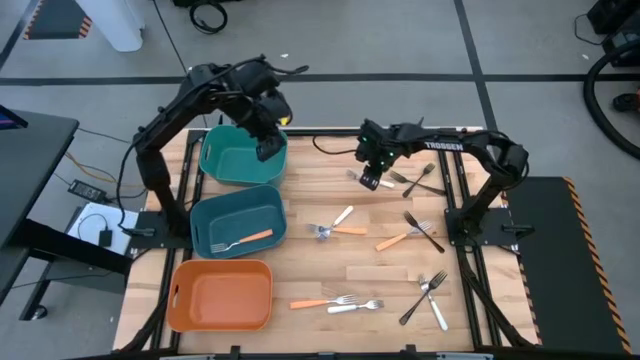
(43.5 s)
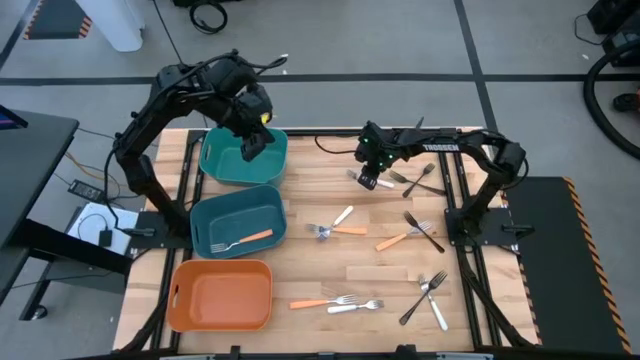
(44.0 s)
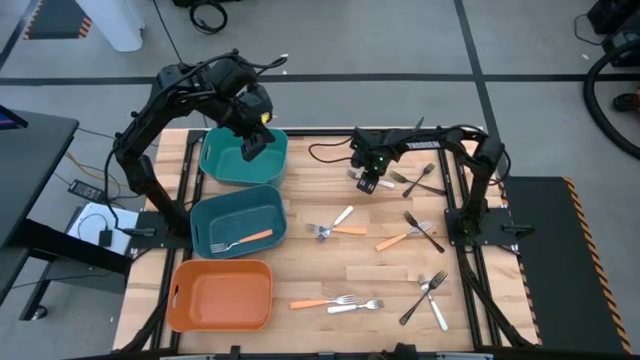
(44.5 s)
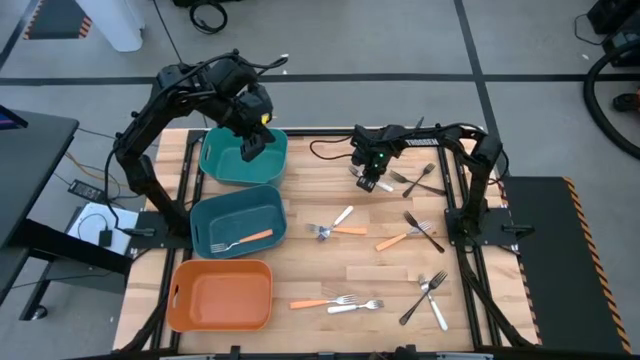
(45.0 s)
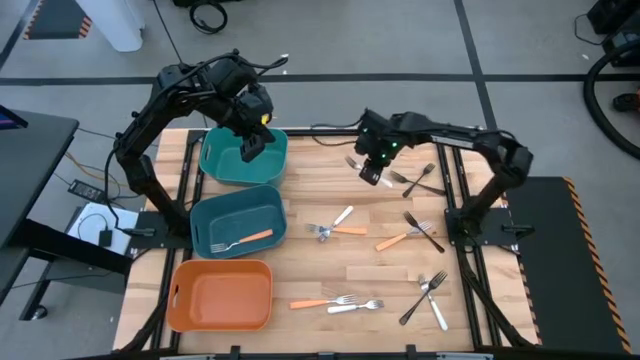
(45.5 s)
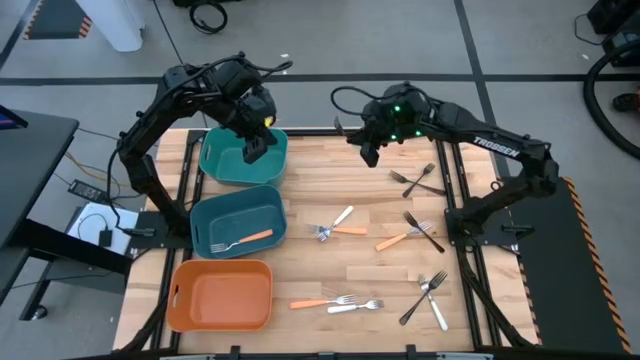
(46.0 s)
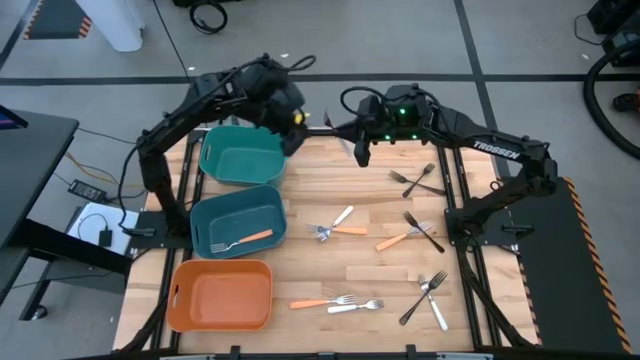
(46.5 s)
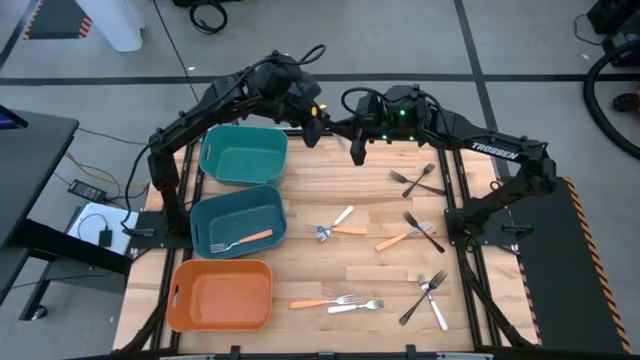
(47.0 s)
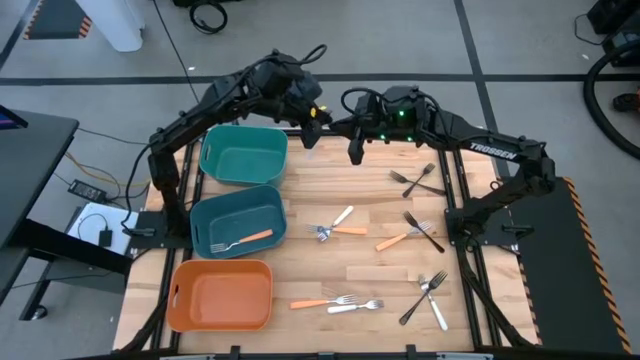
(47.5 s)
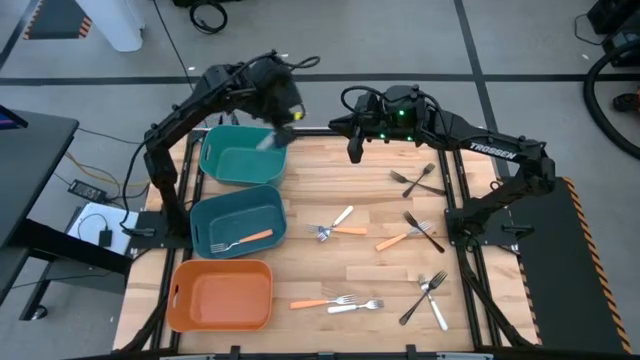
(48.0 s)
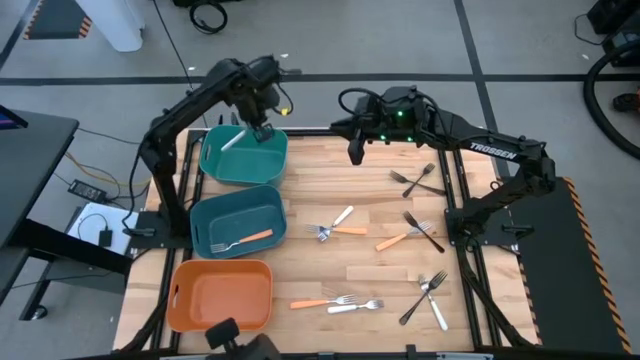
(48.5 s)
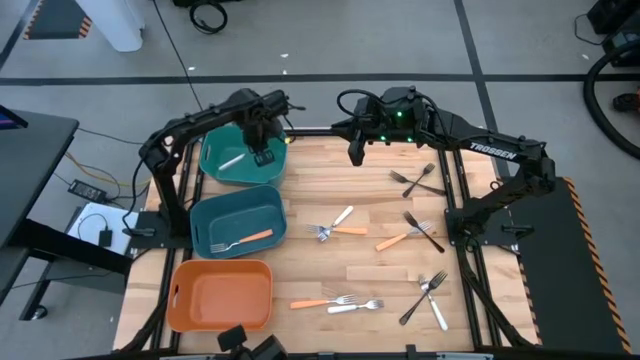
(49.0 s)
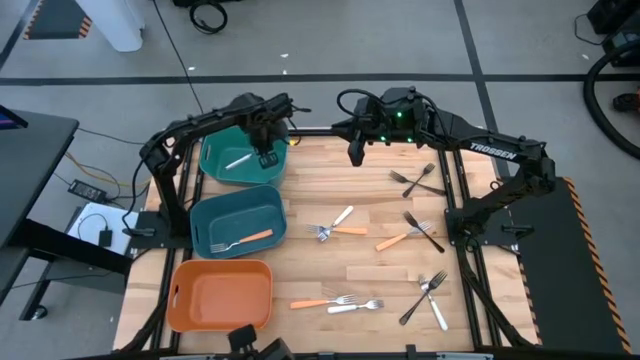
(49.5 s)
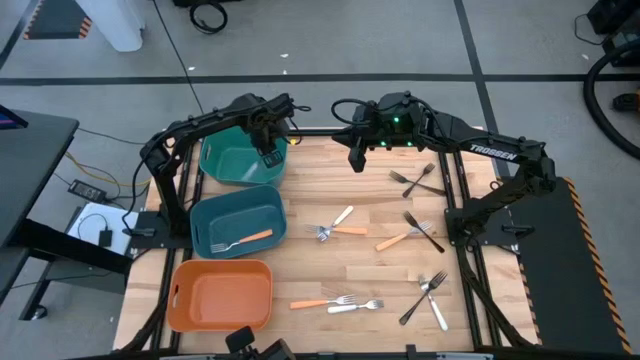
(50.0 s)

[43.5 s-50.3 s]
Task: Sort silverware by color (type)
Put the white fork into the green bin

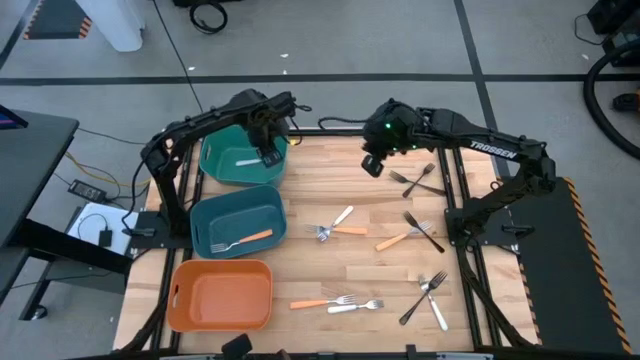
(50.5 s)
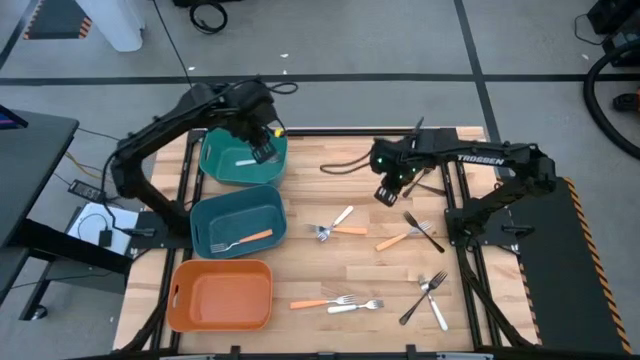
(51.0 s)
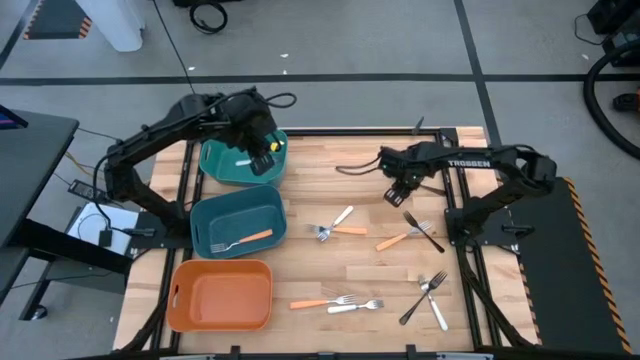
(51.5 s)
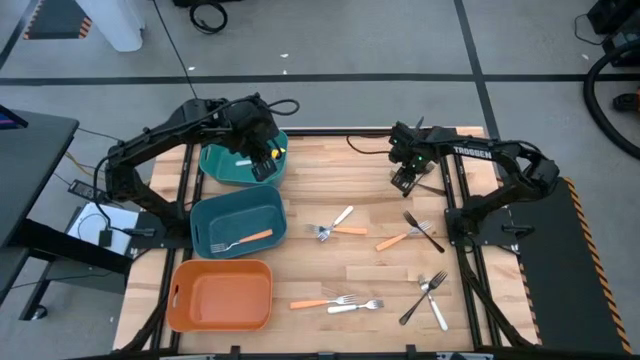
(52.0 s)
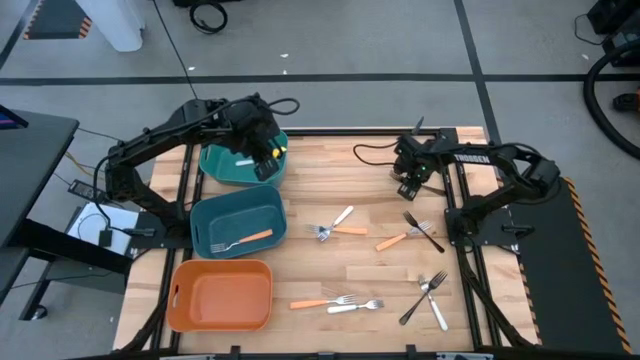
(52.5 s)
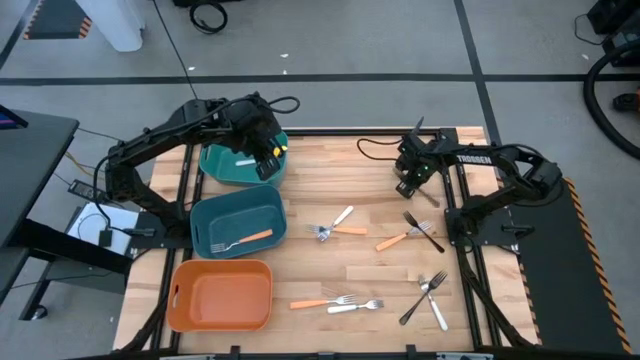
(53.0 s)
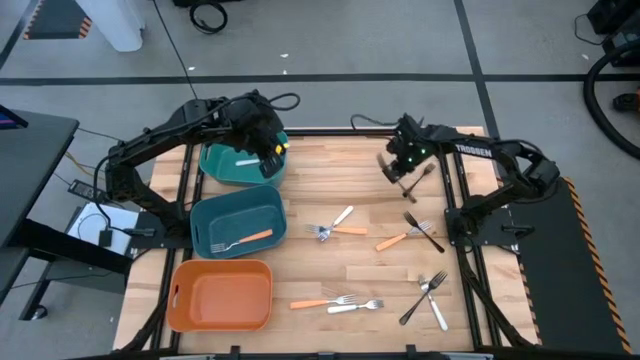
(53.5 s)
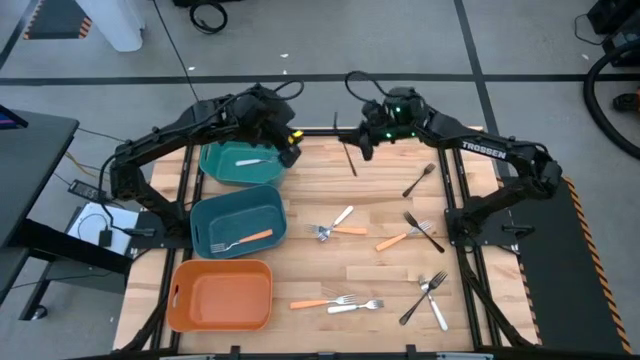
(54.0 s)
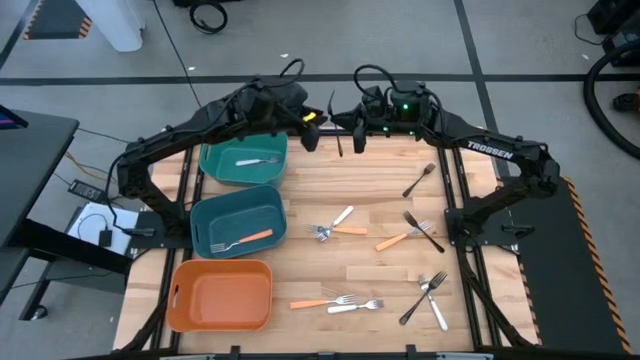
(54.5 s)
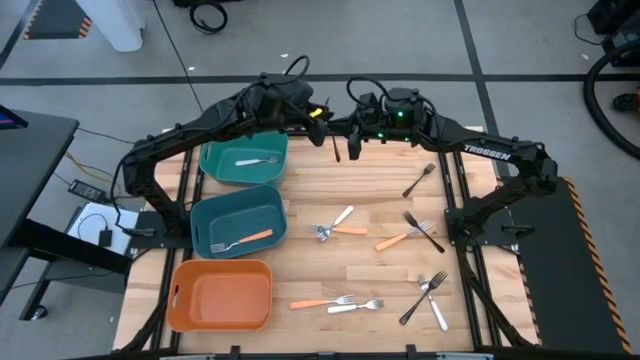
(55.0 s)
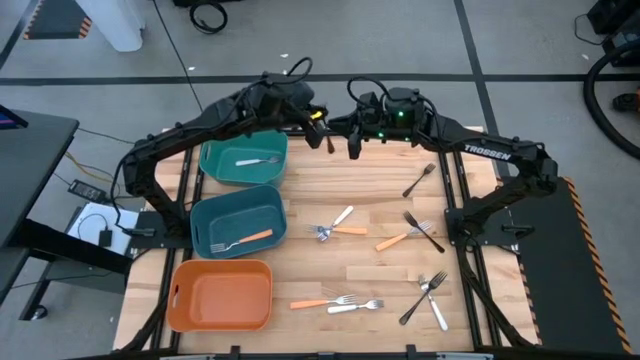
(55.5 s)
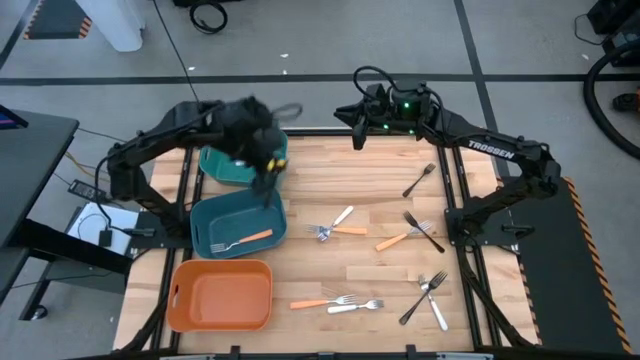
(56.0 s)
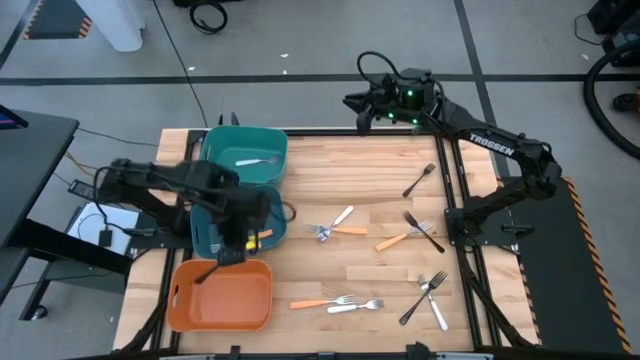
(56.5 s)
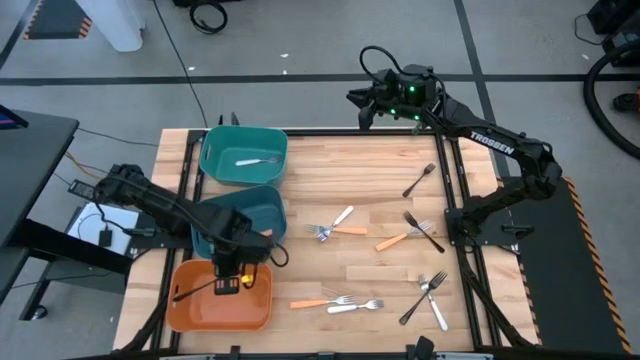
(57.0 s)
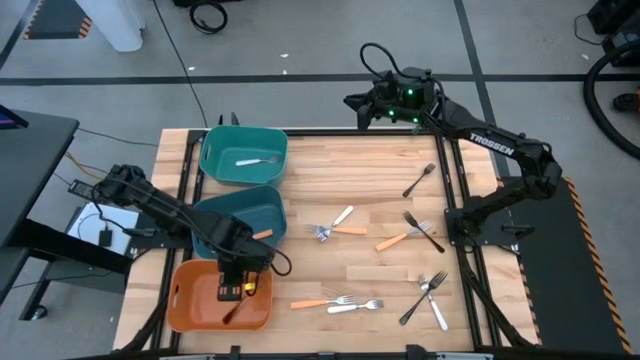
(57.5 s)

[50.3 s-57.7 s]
Put the black fork into the orange bin

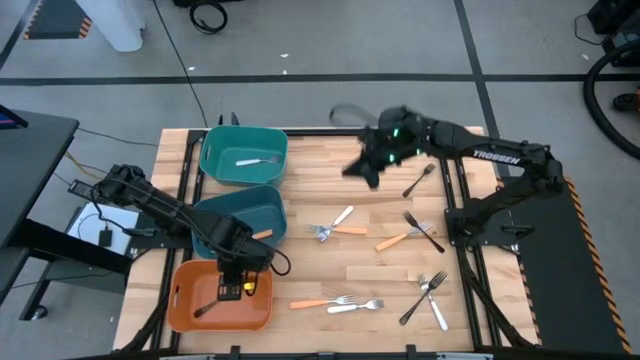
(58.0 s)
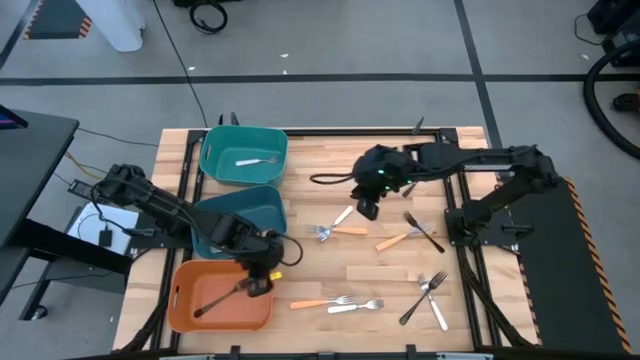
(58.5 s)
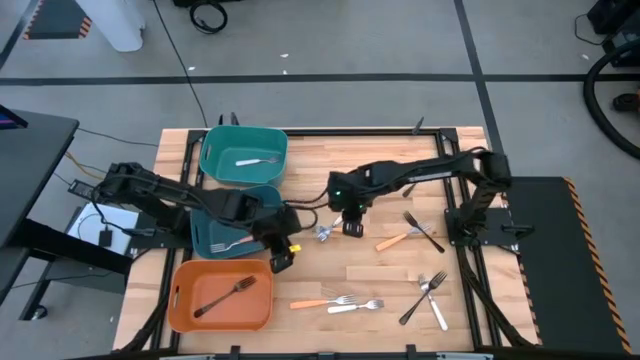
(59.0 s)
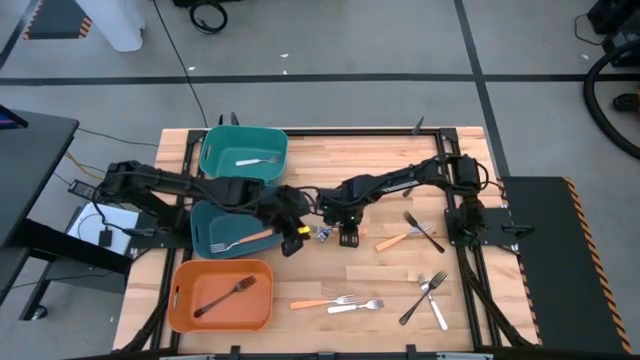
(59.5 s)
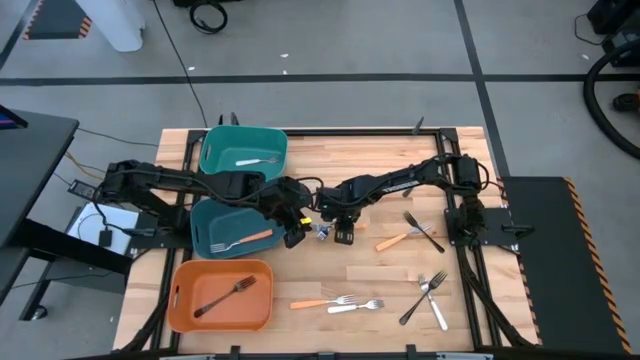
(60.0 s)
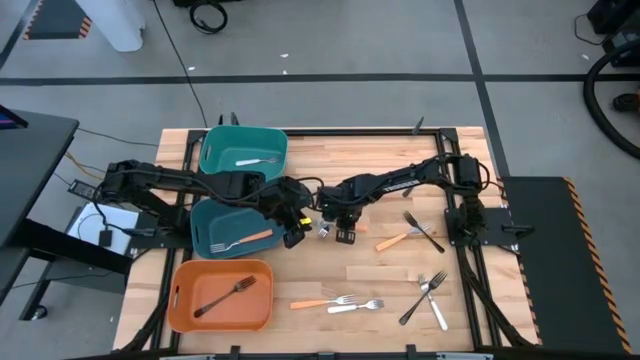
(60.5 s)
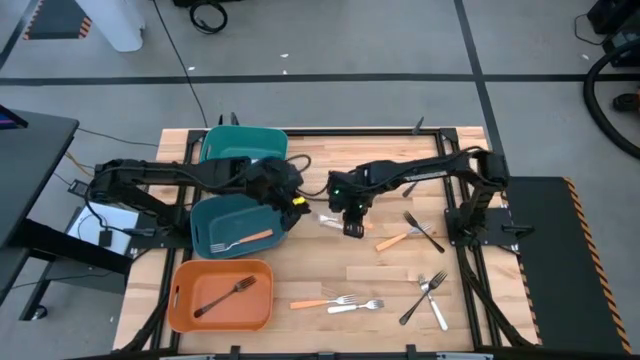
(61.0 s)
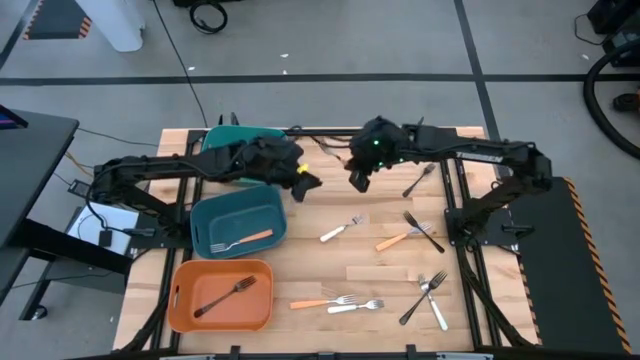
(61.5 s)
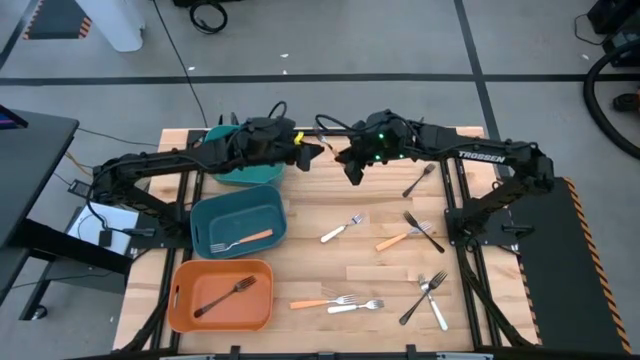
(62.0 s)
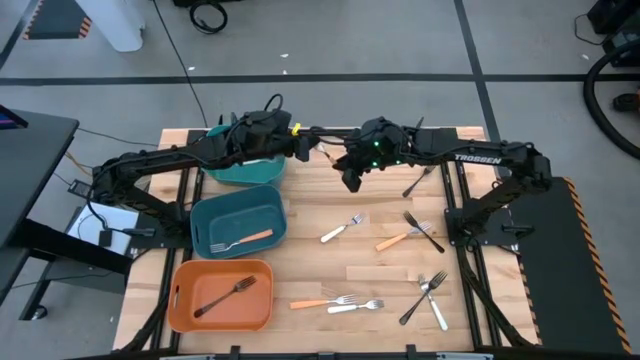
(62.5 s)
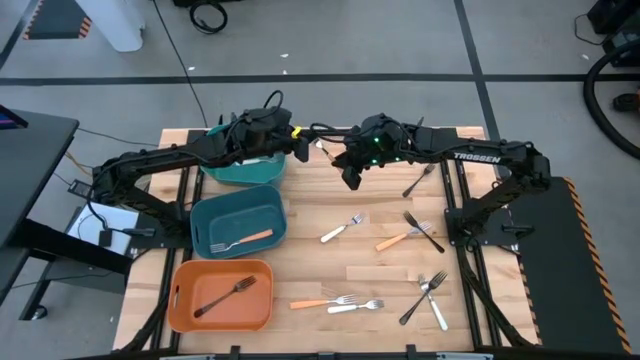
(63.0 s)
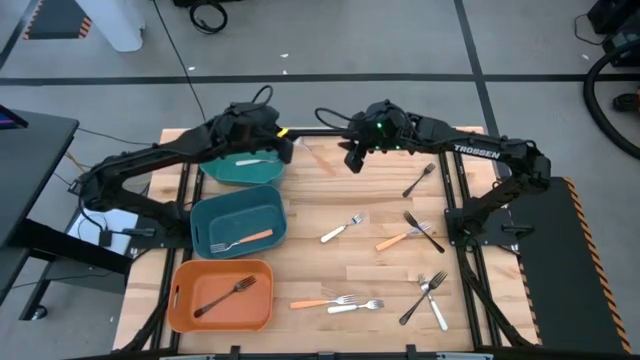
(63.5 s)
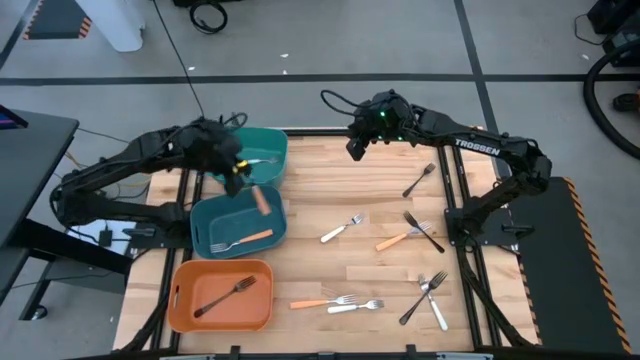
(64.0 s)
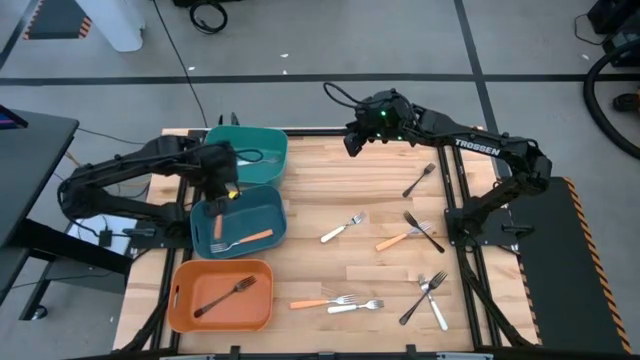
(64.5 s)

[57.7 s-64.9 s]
Put the orange fork into the blue bin
